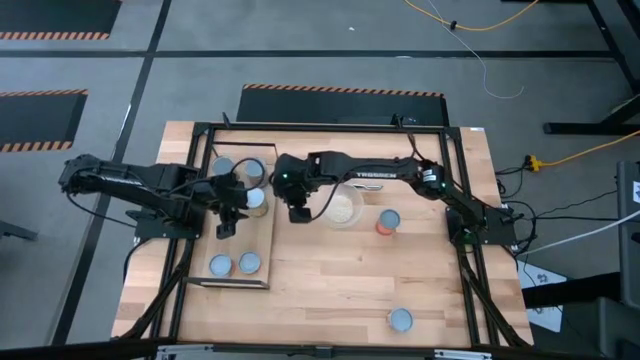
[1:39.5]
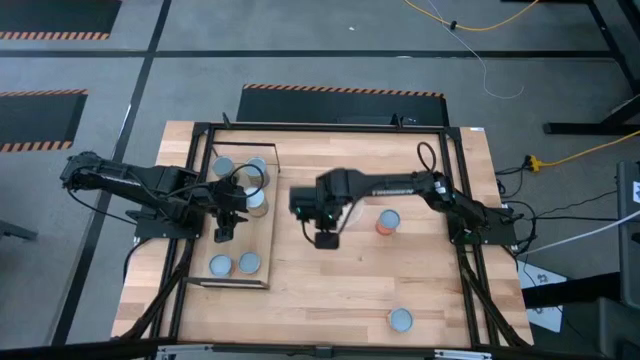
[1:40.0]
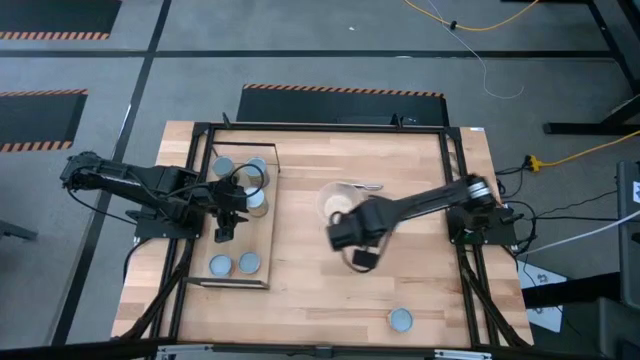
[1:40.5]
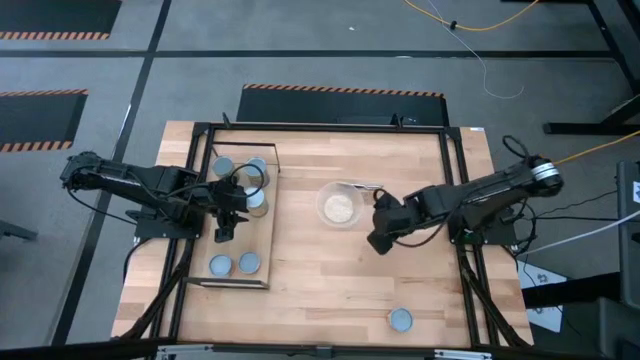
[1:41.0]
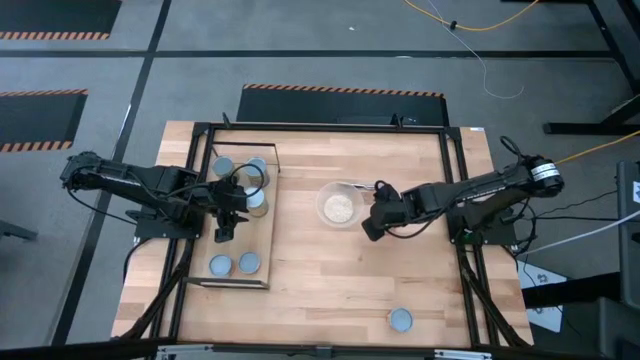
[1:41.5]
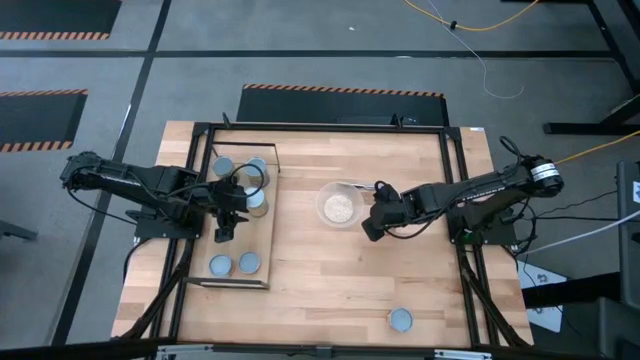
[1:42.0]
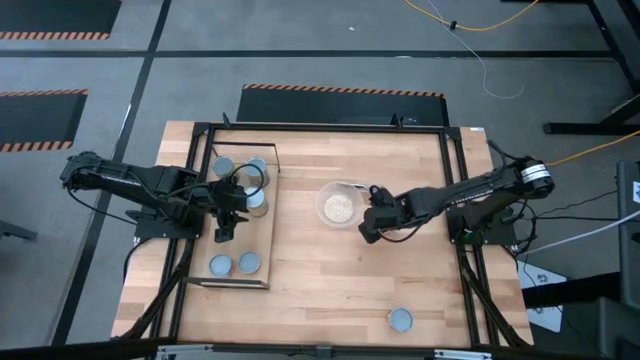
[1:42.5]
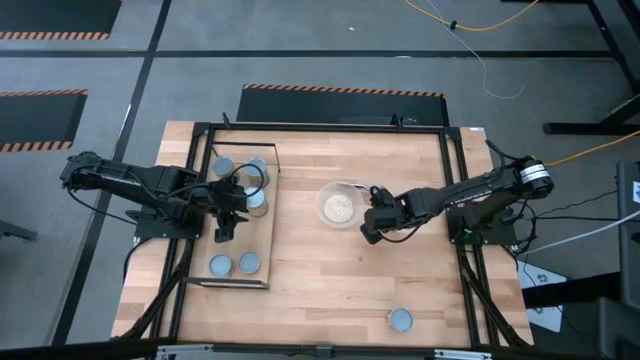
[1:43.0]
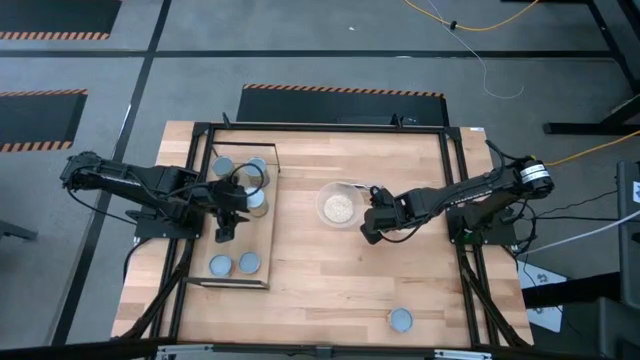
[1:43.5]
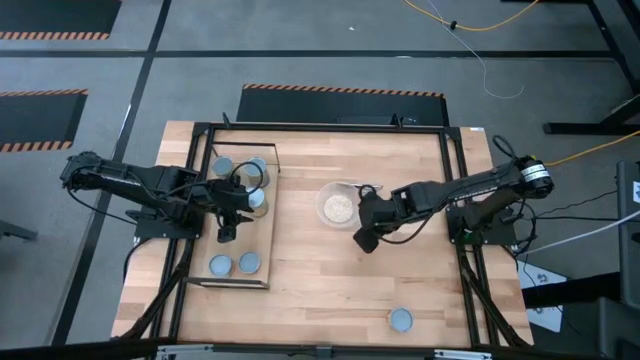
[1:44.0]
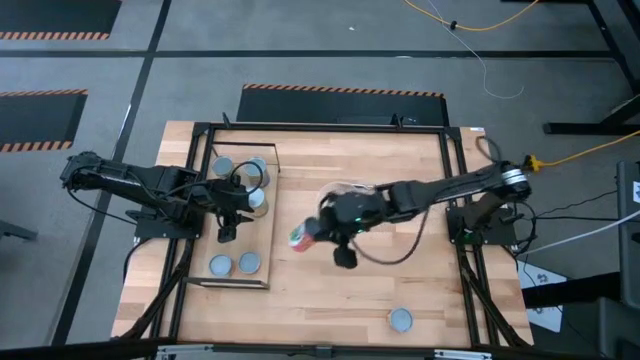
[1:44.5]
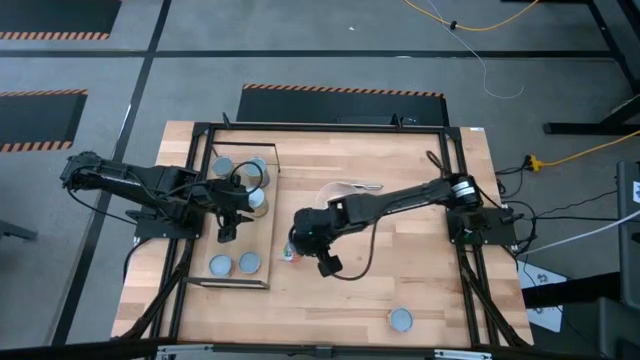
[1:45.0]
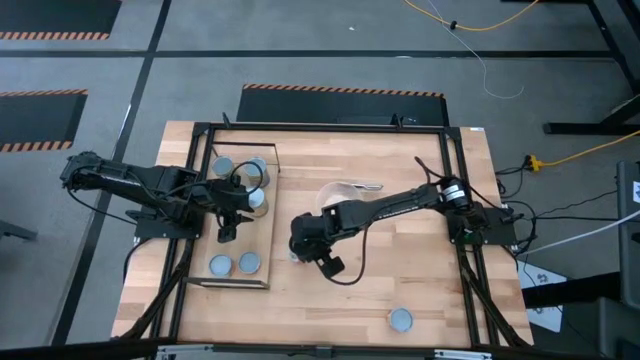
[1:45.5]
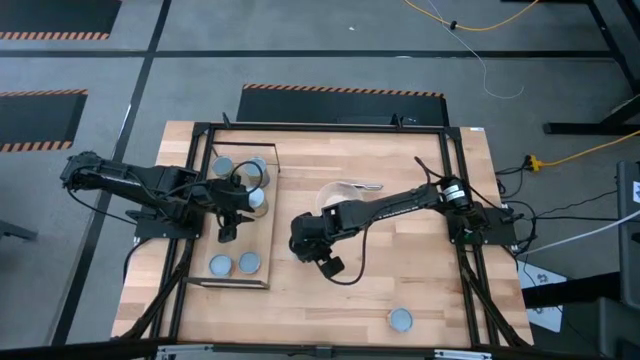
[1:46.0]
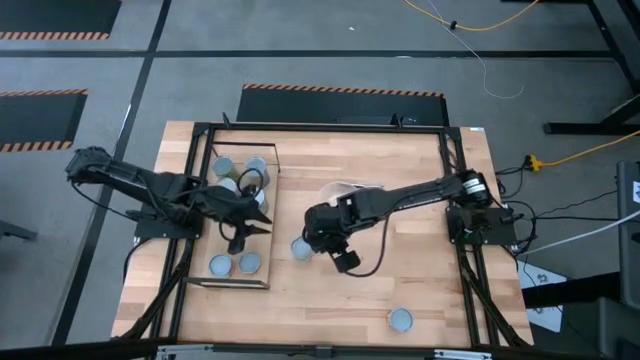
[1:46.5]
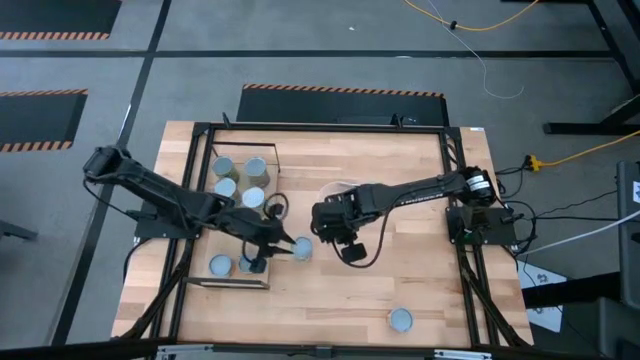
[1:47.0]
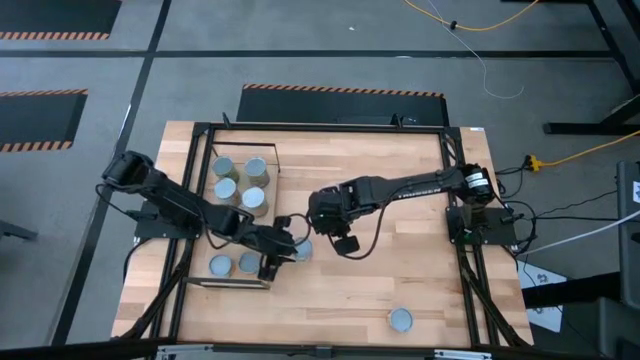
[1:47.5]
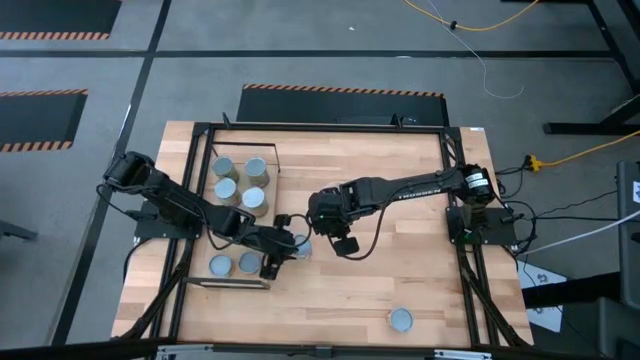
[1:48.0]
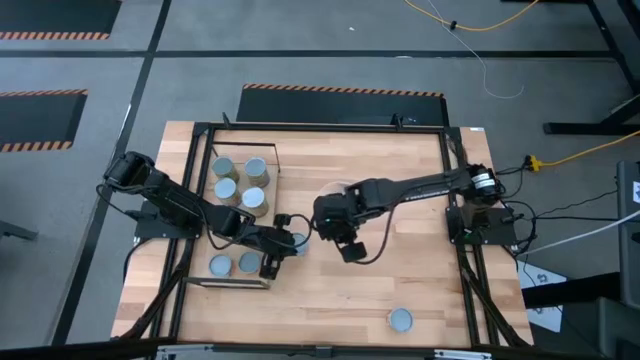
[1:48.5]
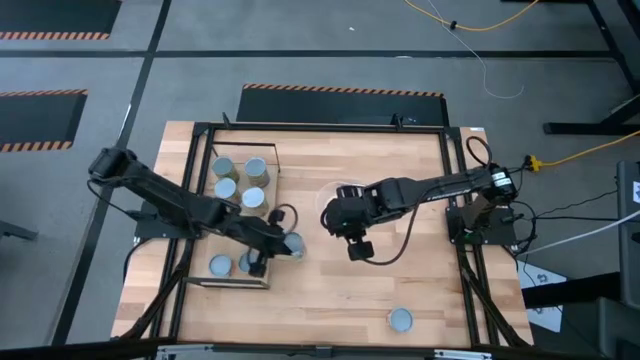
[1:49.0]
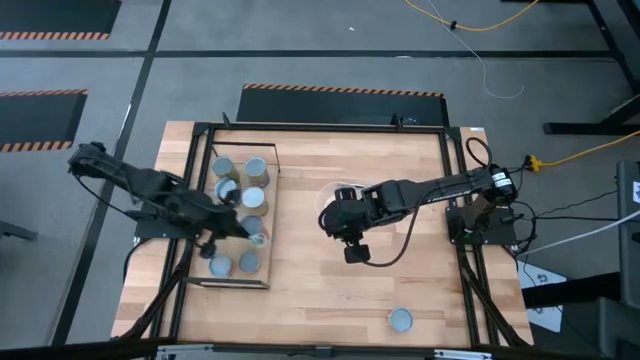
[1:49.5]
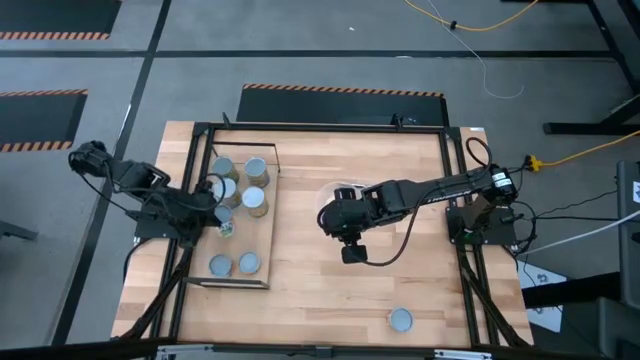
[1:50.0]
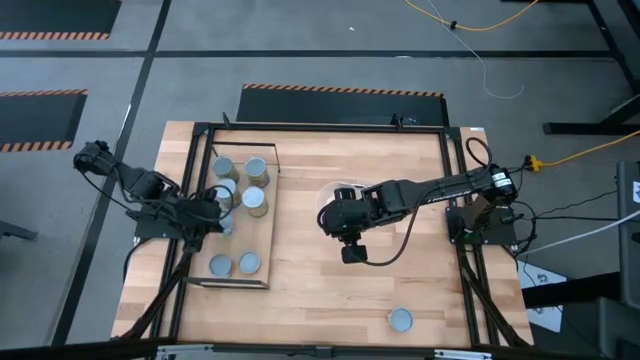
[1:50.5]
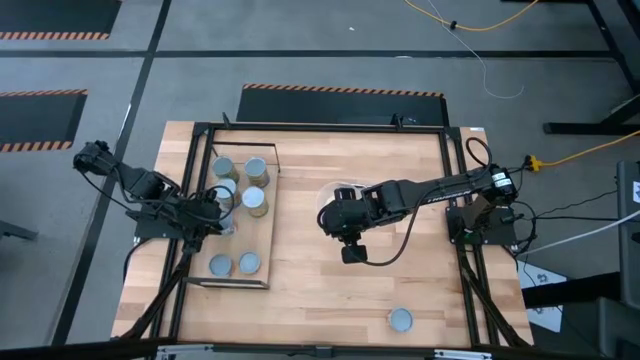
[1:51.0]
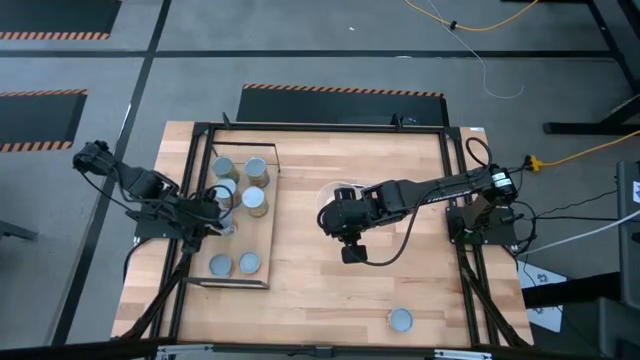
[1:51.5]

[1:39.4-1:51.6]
Task: Pick and place cans onto a shelf
Put the canned mixed fruits on the shelf

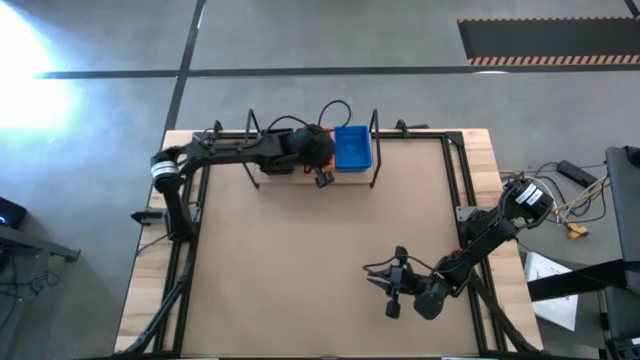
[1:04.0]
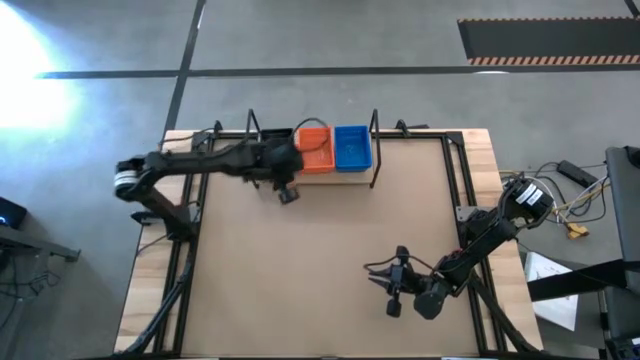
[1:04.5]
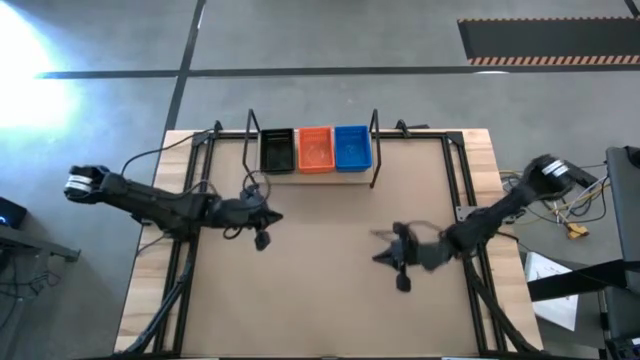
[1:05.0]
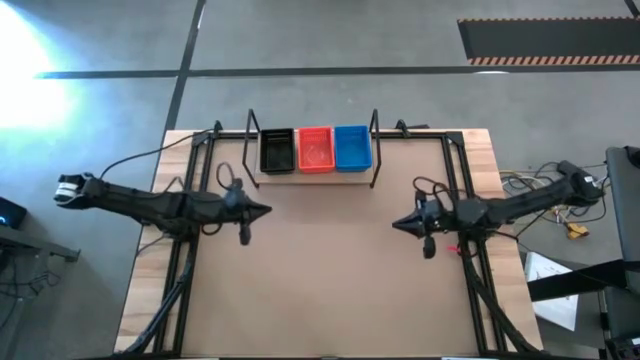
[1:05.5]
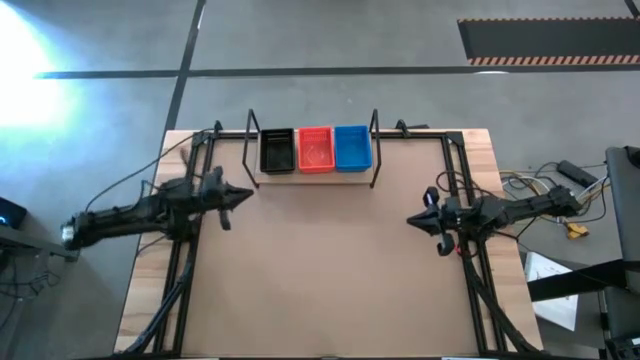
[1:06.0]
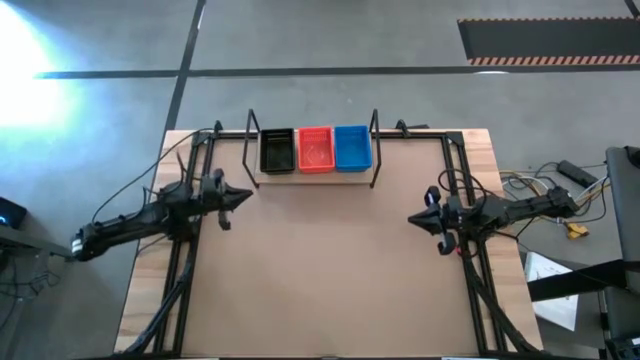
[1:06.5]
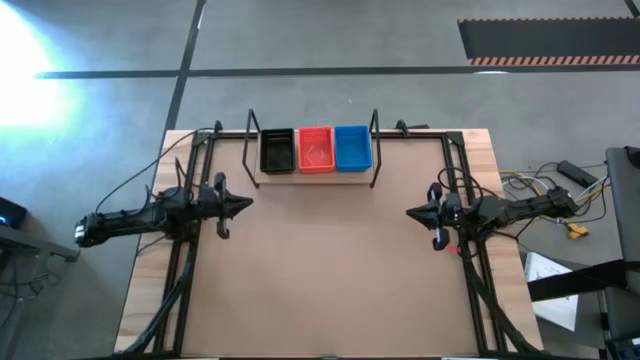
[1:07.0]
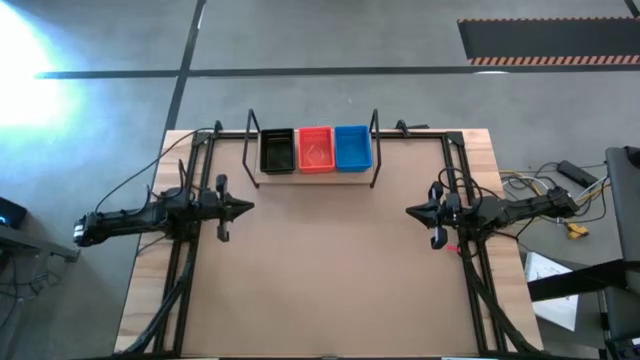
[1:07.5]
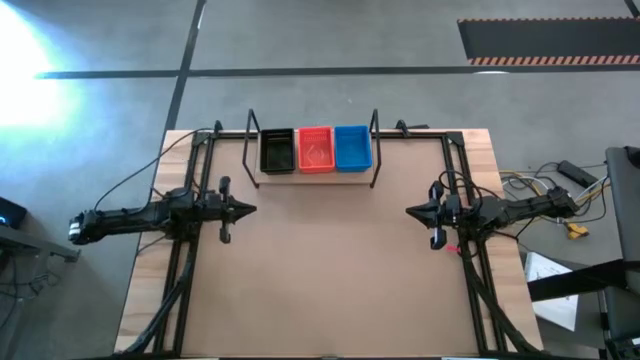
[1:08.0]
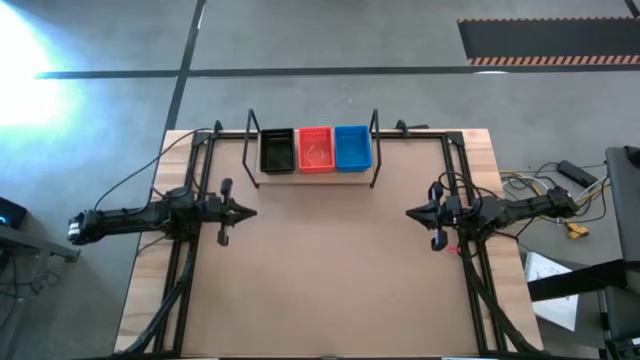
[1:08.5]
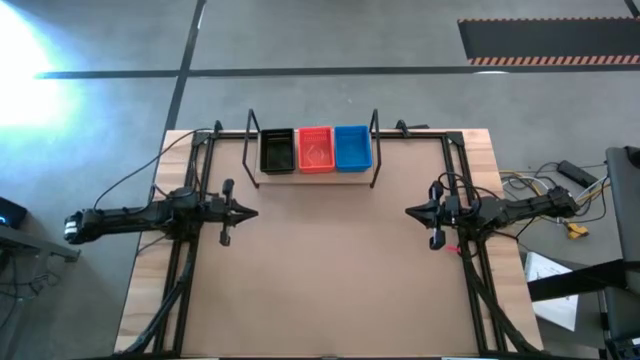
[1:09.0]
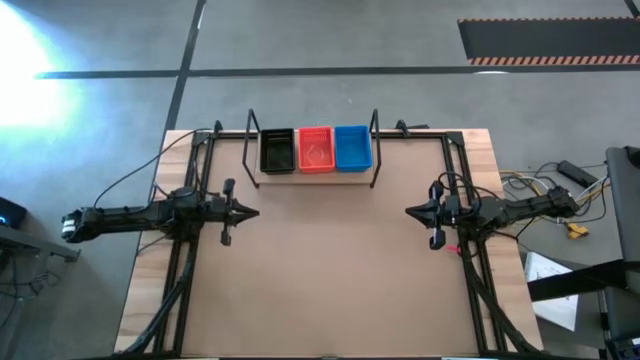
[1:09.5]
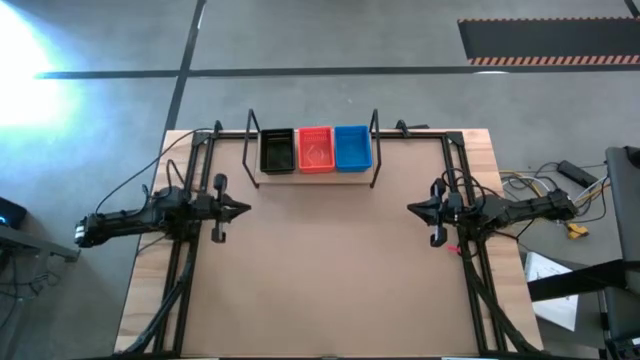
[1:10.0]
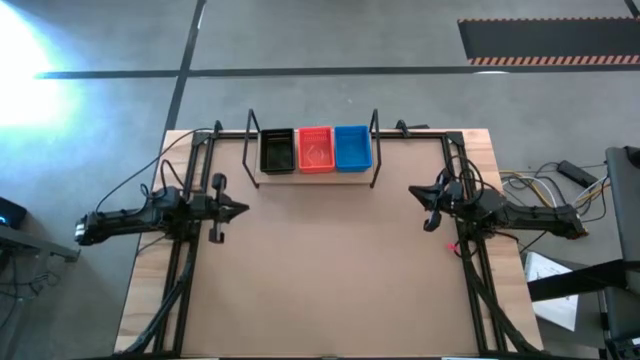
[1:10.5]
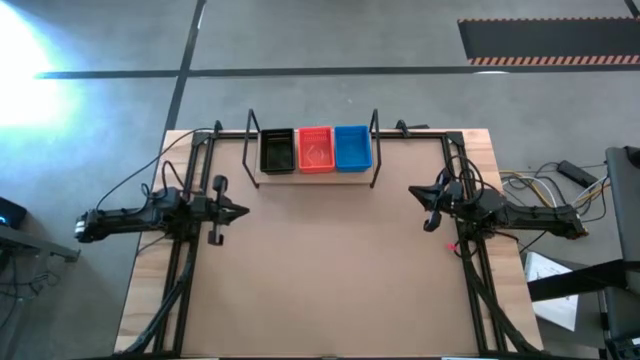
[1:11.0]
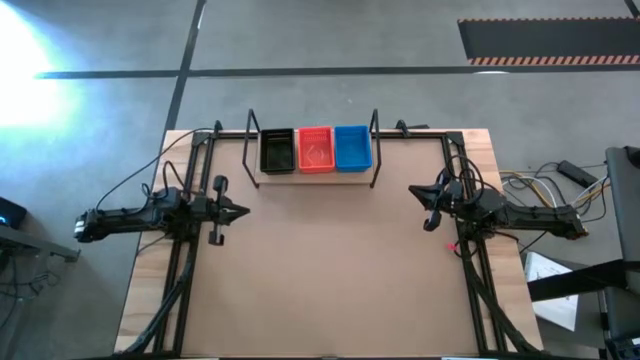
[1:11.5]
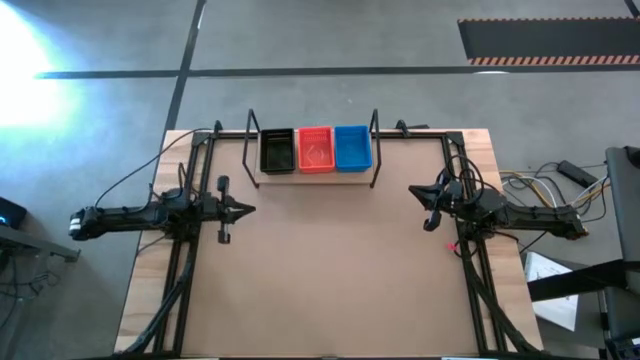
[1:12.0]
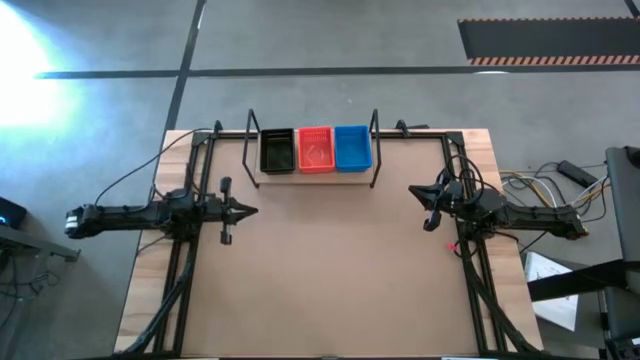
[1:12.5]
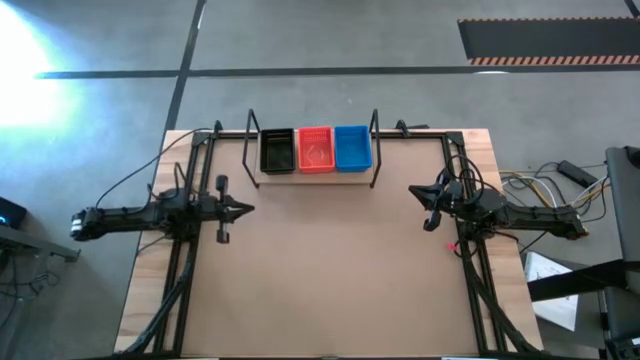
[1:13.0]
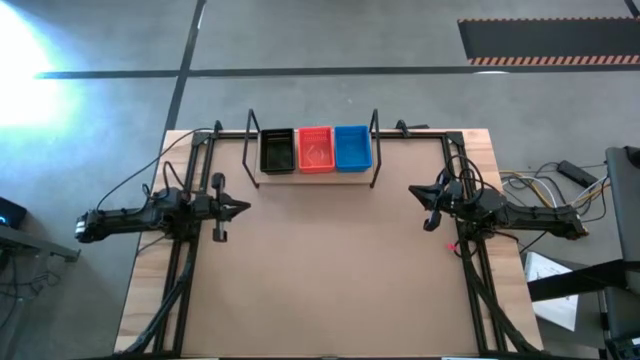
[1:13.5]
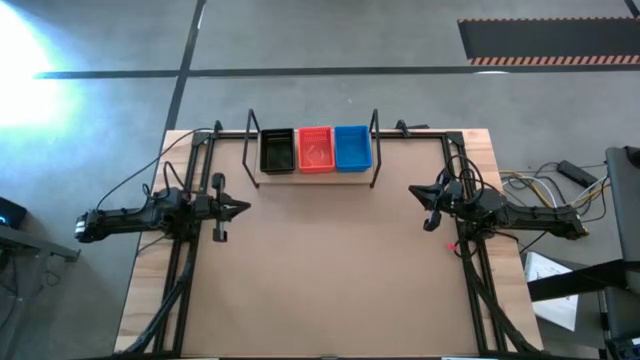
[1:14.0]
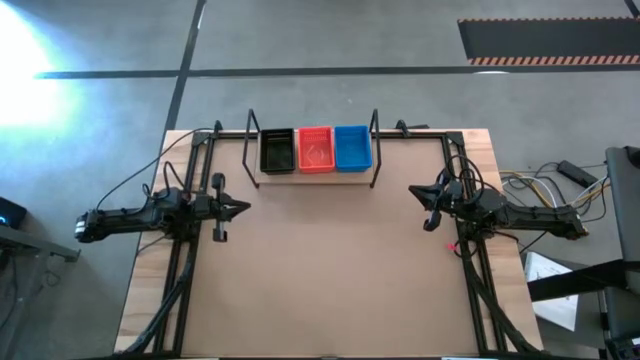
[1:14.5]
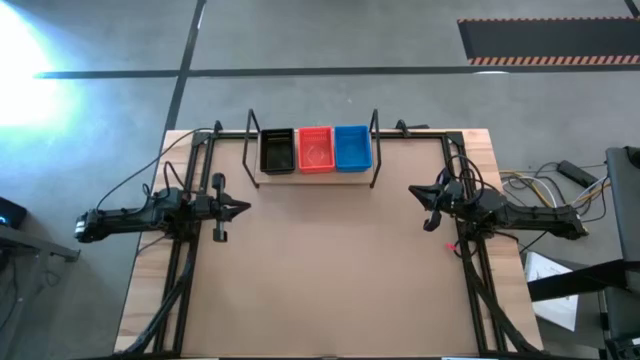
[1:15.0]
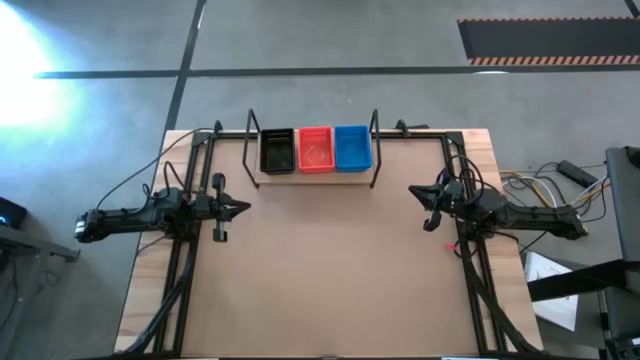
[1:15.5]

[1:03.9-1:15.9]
Task: Stack baskets on shelf by color
Return to Home Position
